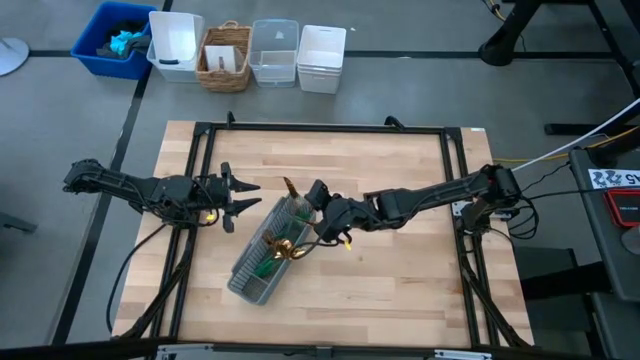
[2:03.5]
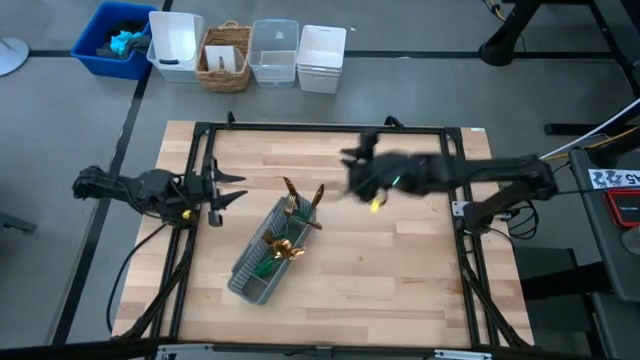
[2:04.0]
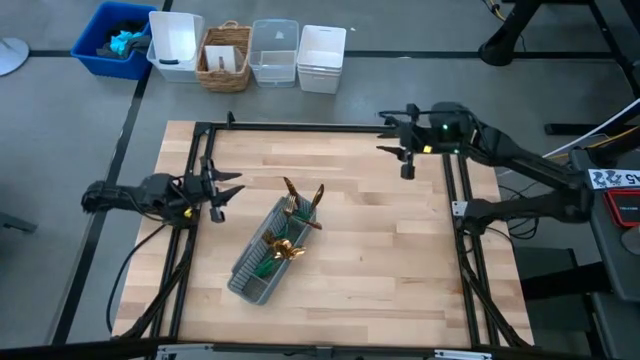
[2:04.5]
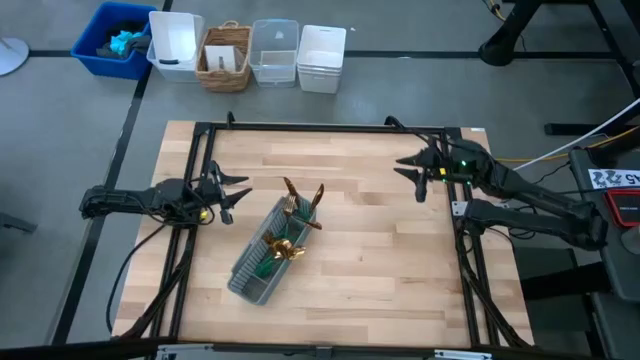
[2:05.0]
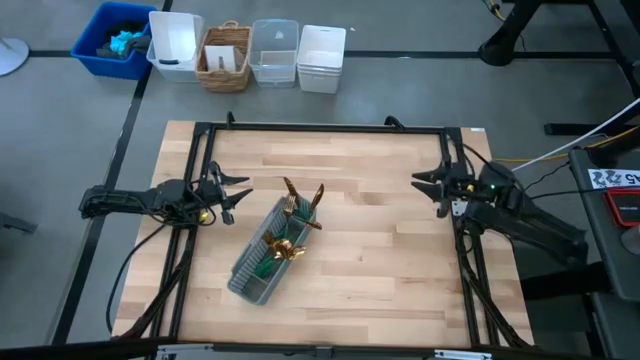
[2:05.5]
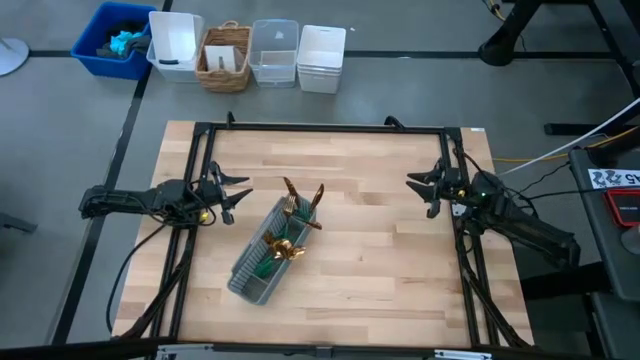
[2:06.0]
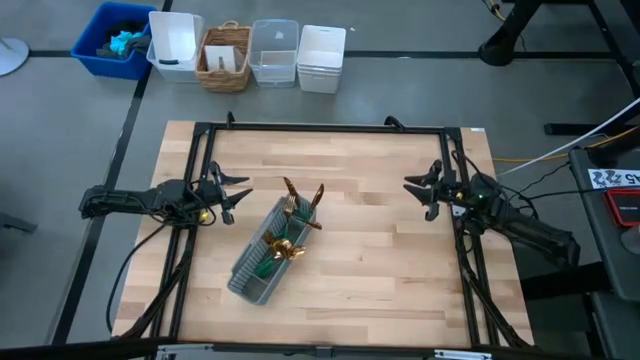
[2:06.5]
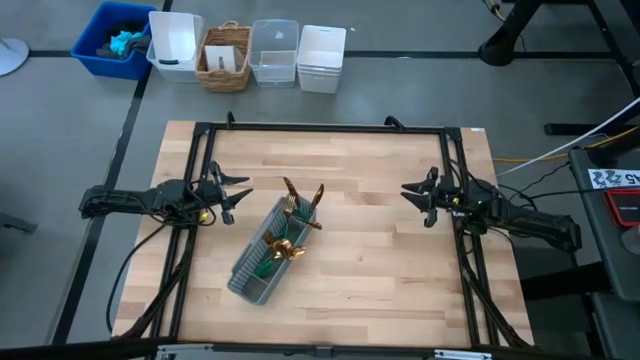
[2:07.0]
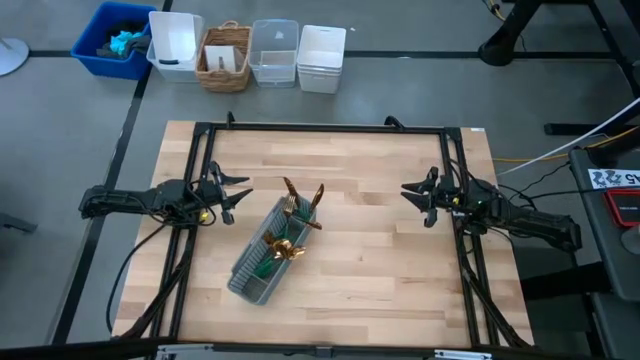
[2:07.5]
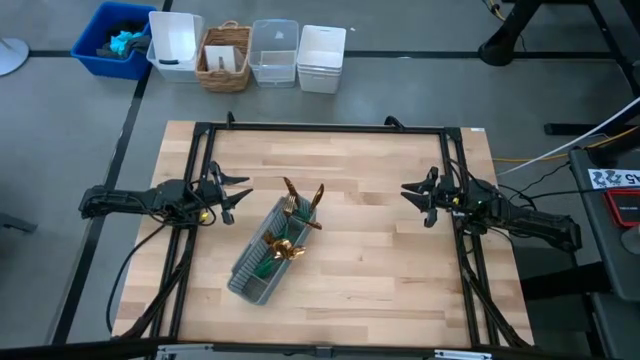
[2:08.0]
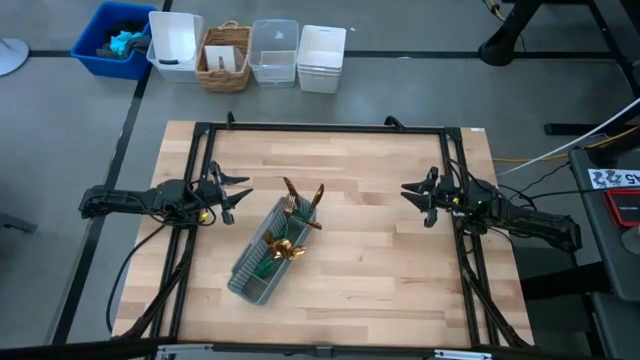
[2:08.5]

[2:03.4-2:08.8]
Task: Sort silverware
Return to Home Position

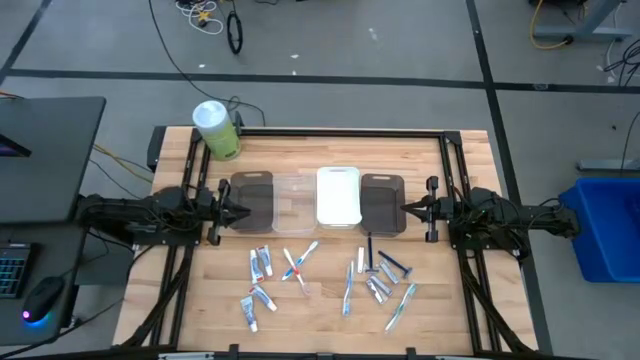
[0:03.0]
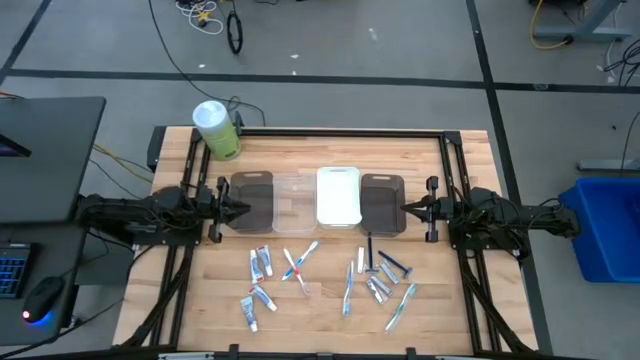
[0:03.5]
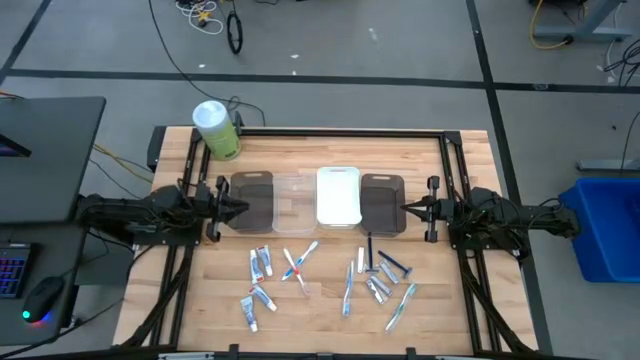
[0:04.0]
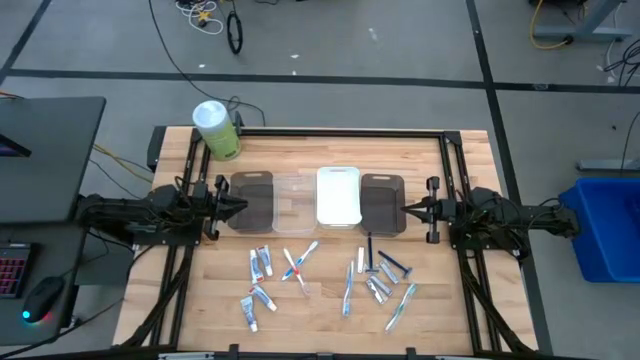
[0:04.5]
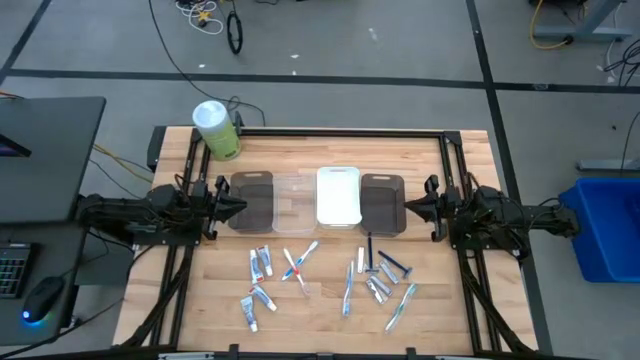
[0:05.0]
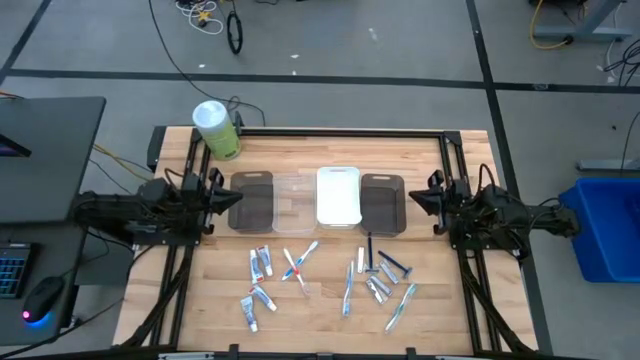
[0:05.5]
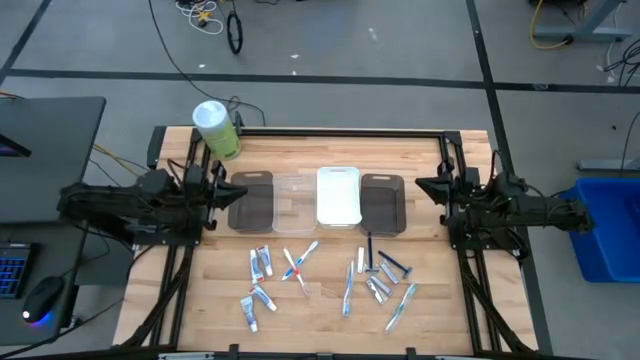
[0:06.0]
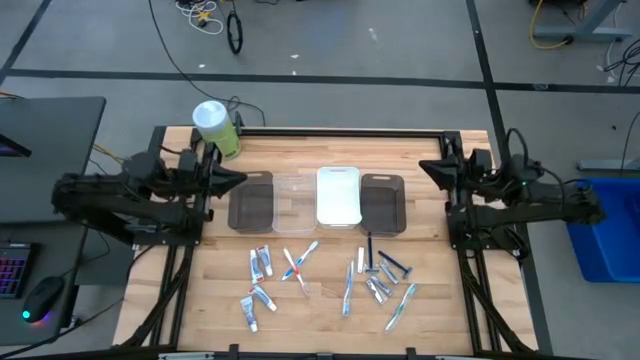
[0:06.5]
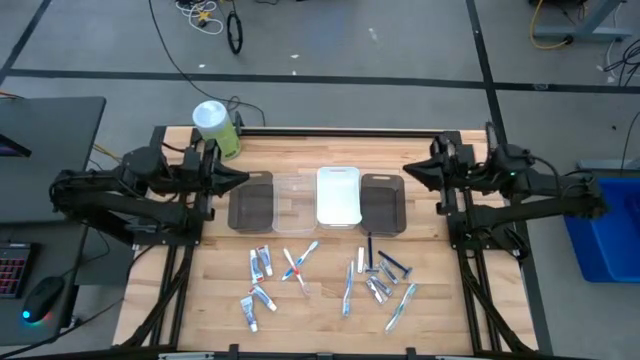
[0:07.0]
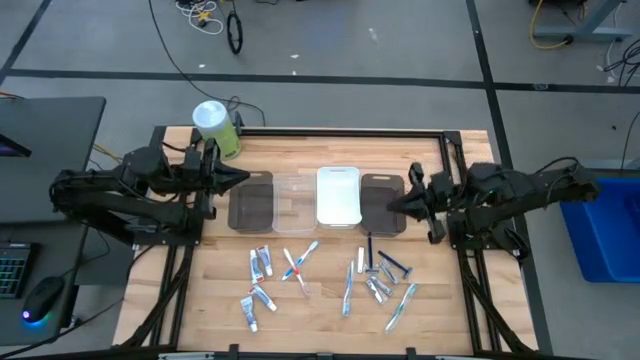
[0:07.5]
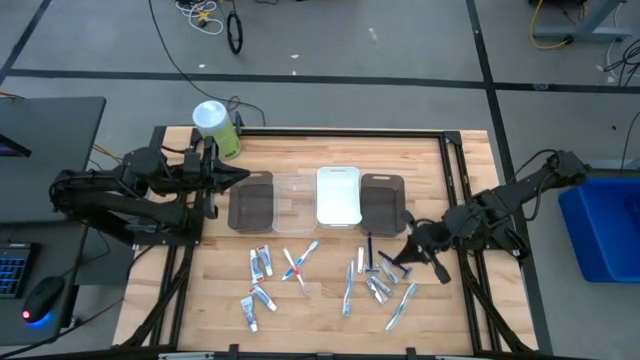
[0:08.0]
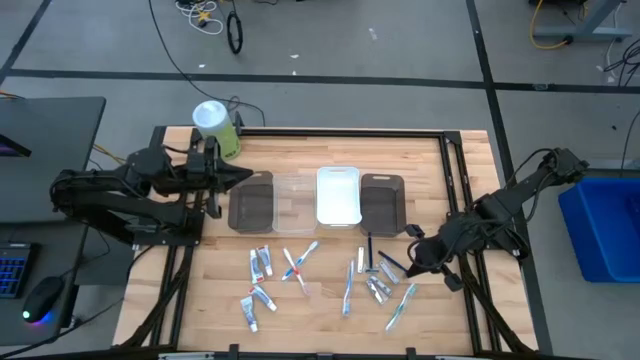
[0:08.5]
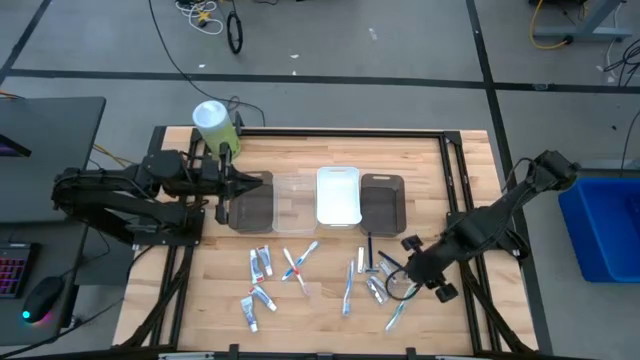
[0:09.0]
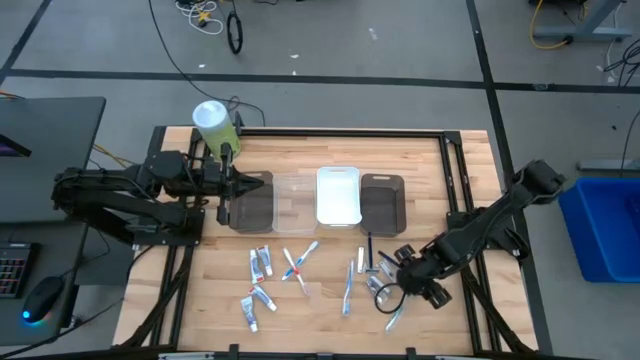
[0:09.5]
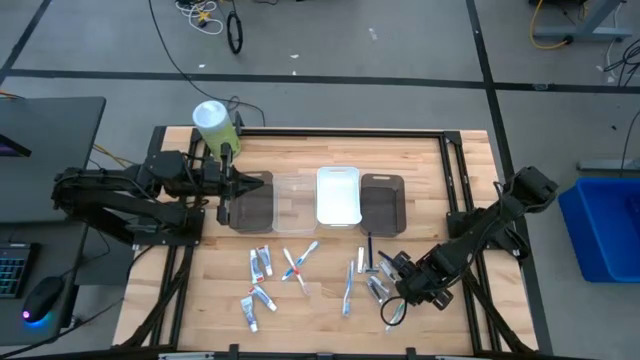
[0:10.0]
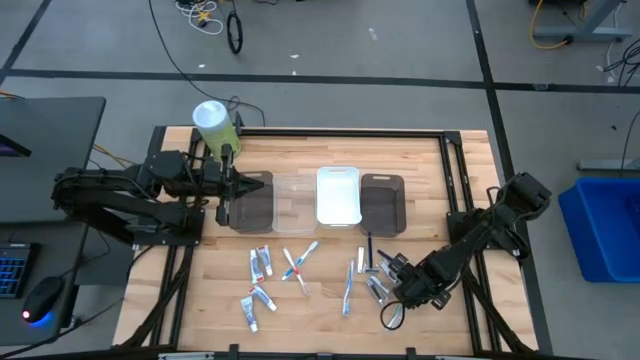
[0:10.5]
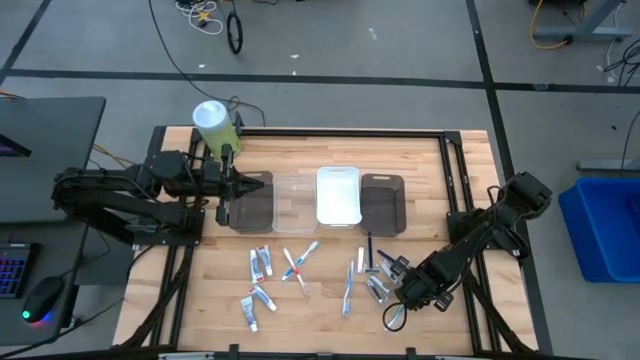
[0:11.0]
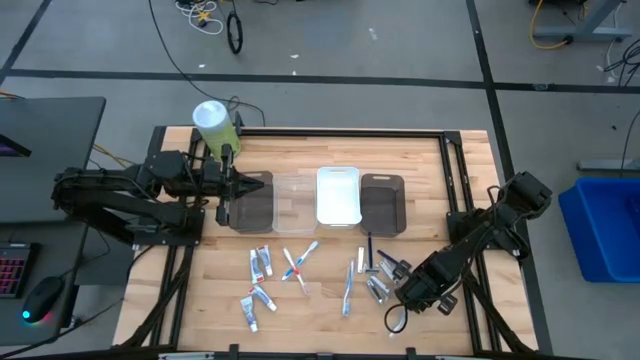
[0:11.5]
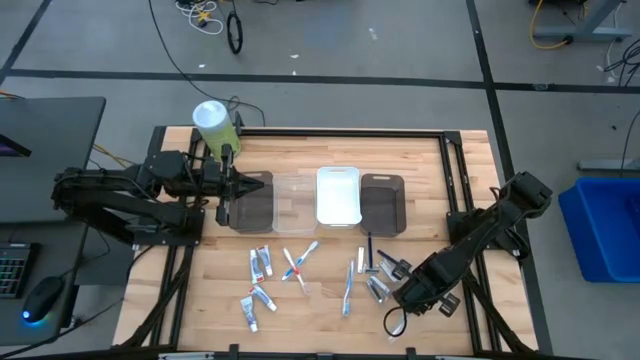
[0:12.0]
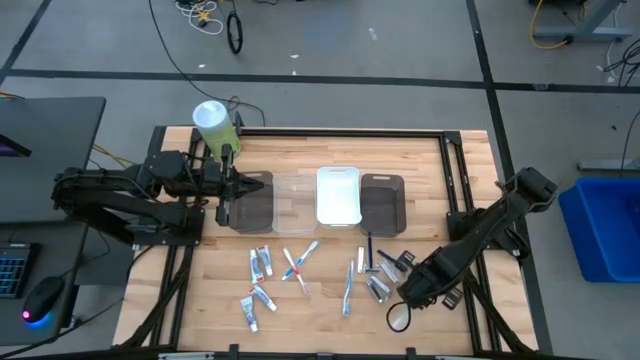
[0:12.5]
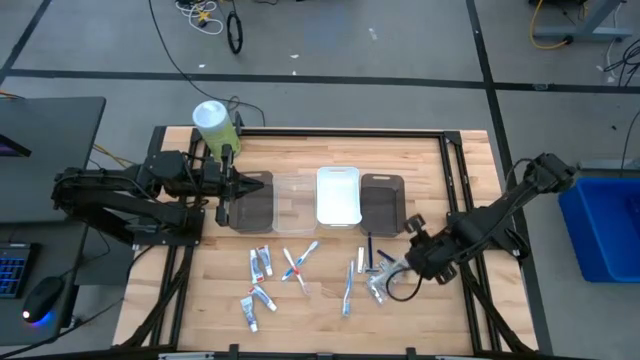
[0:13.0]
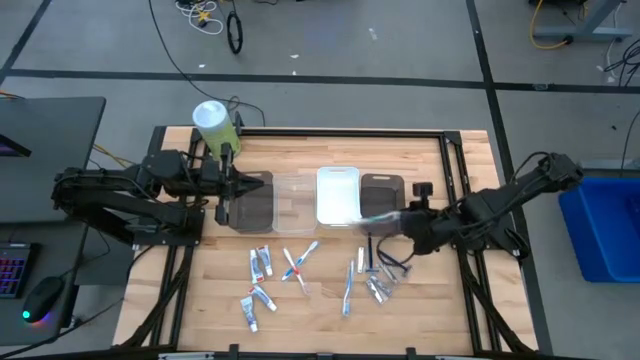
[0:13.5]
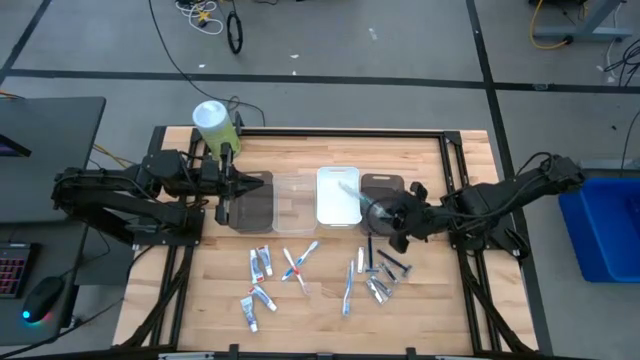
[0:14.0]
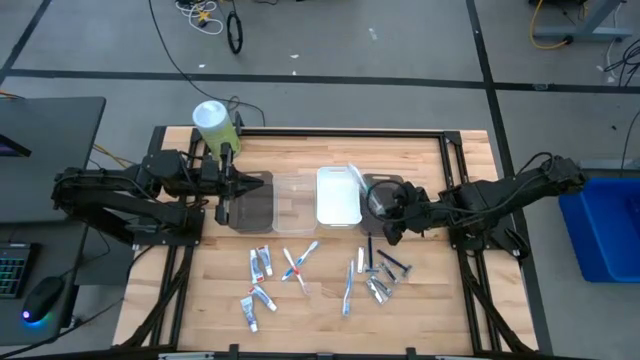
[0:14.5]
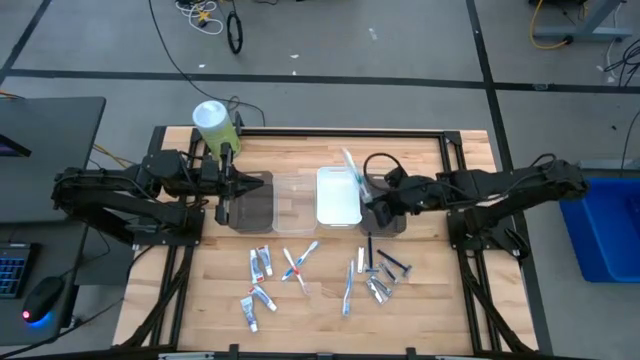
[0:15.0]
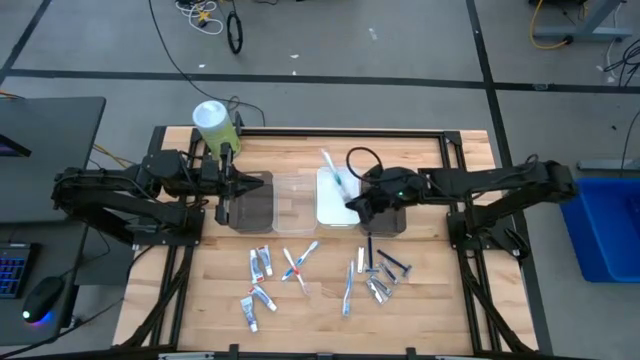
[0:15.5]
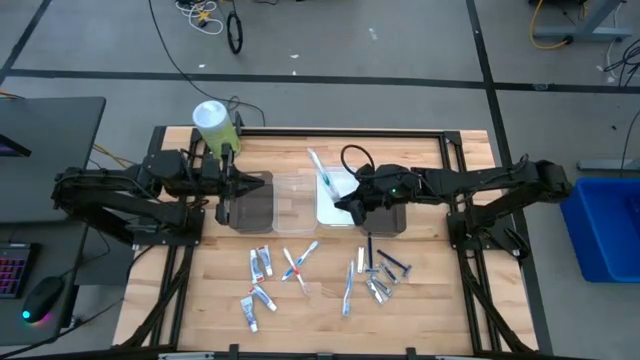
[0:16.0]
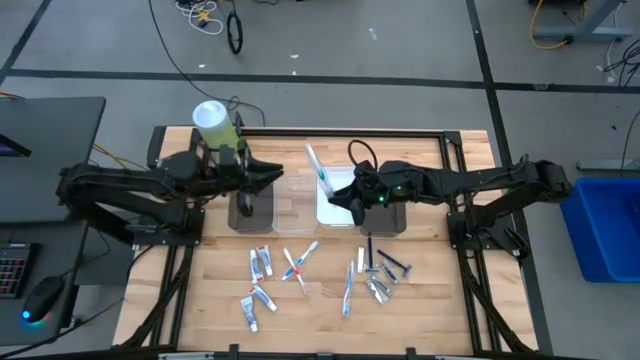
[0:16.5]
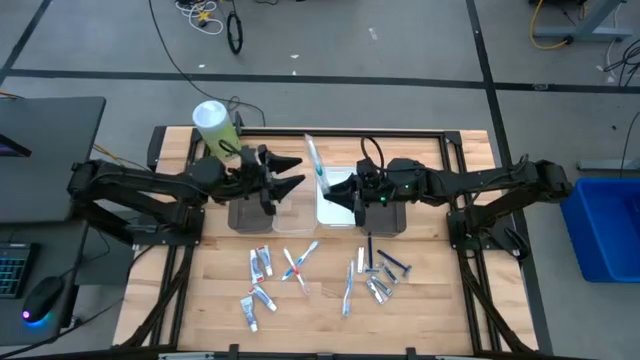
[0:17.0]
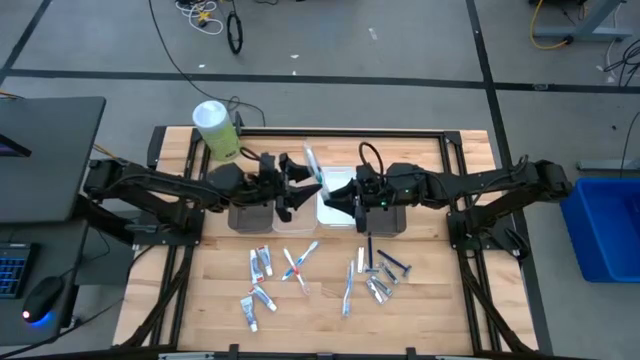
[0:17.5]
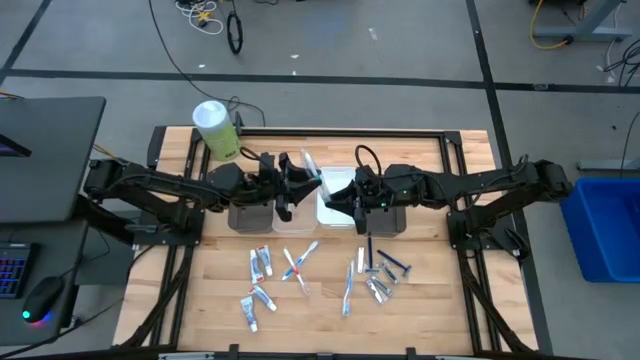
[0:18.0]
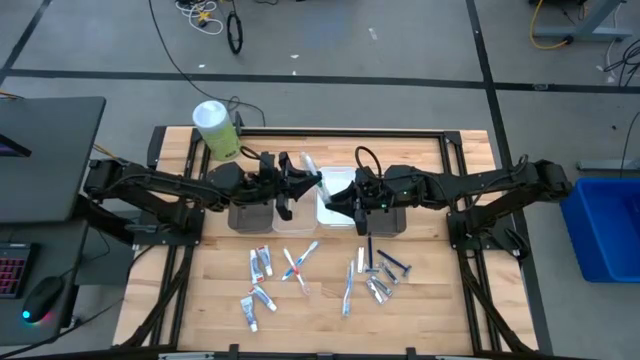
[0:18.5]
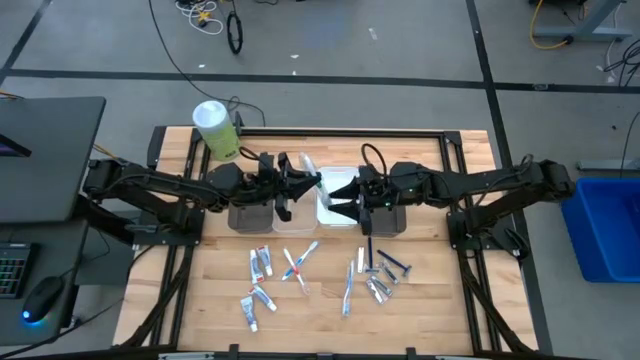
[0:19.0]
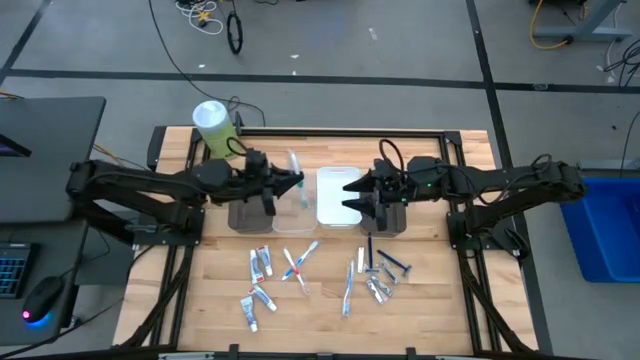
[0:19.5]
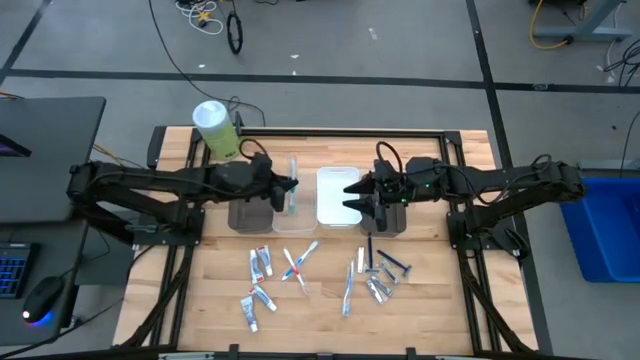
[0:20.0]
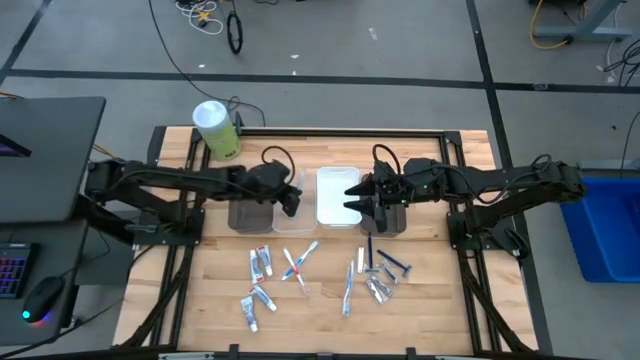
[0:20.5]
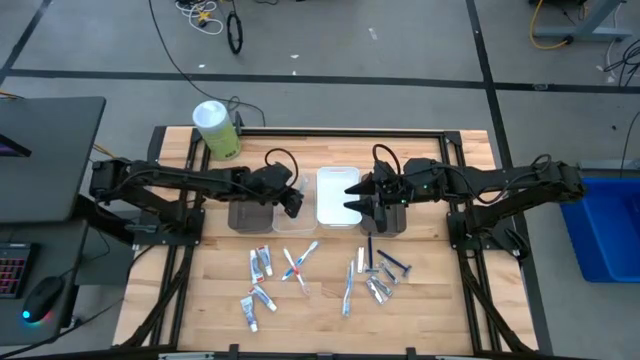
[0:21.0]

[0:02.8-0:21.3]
Task: Pick & Place Travel size toiletries
Put the green toothbrush into the transparent bin
